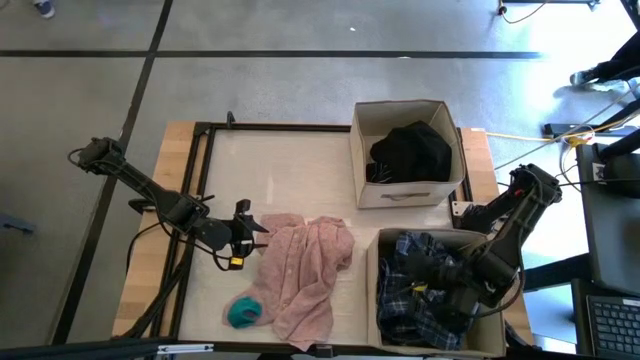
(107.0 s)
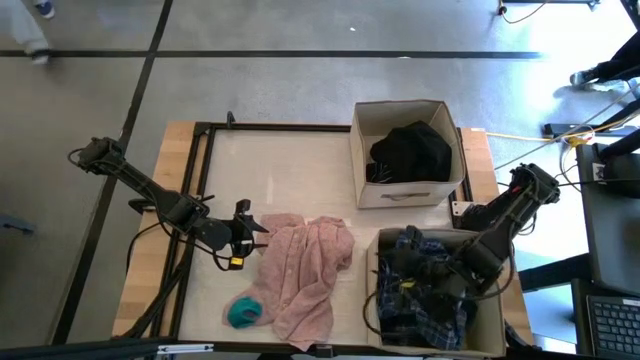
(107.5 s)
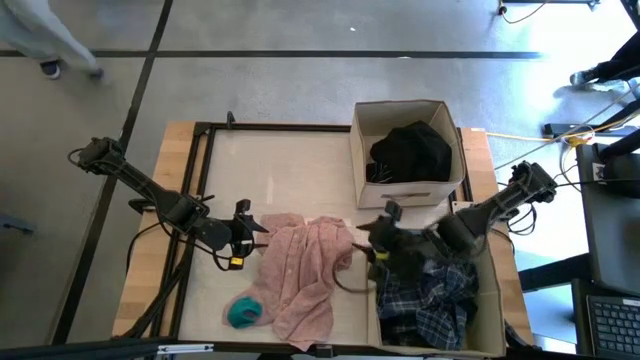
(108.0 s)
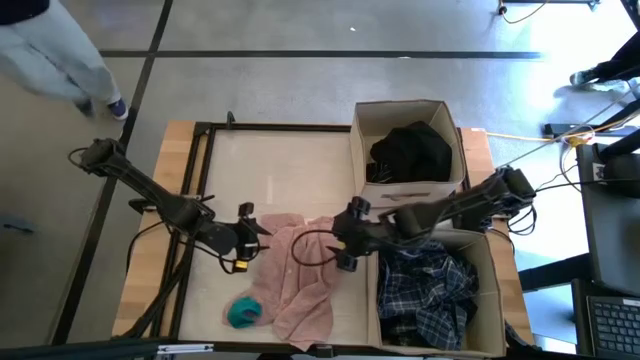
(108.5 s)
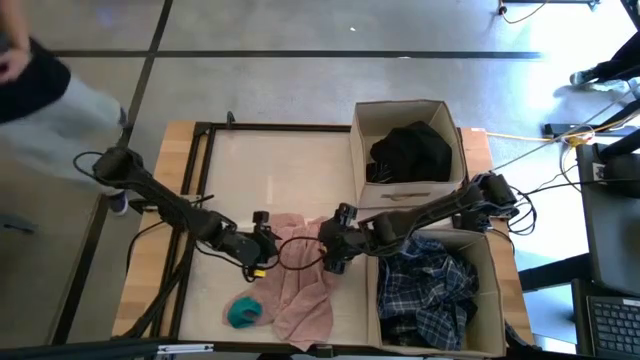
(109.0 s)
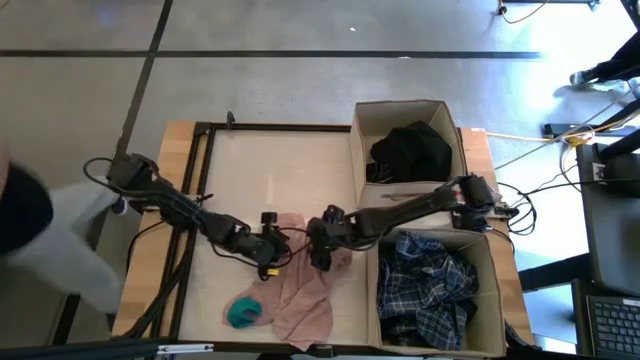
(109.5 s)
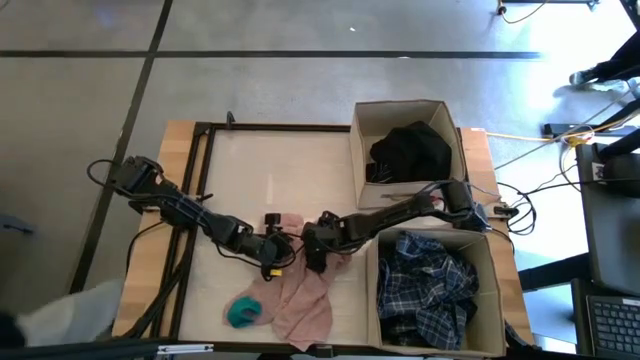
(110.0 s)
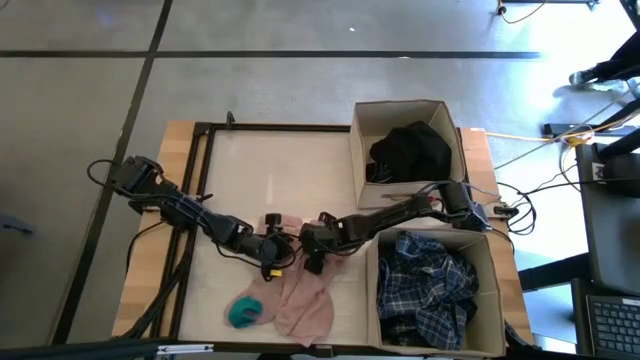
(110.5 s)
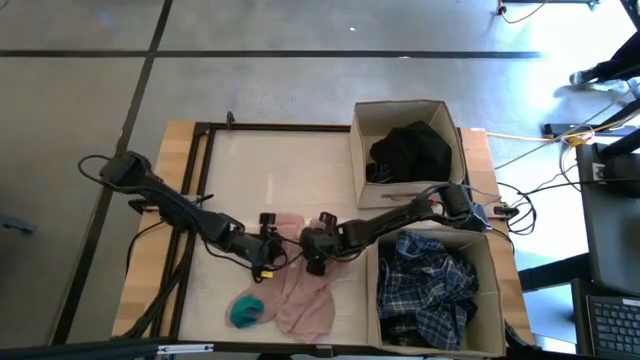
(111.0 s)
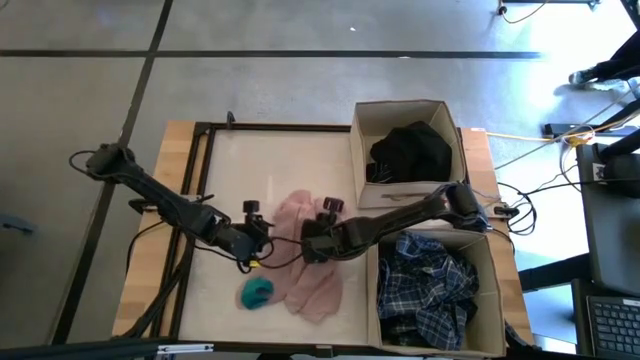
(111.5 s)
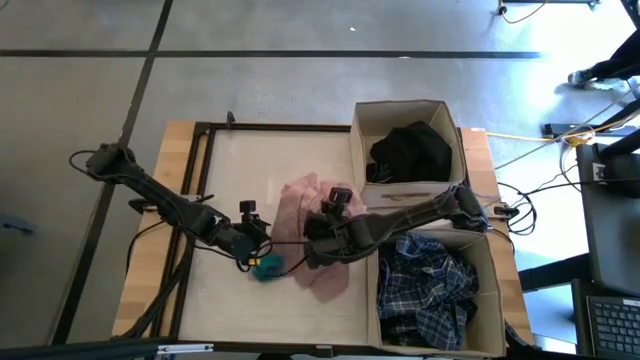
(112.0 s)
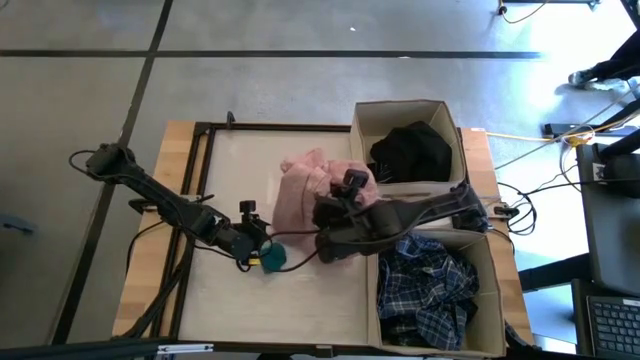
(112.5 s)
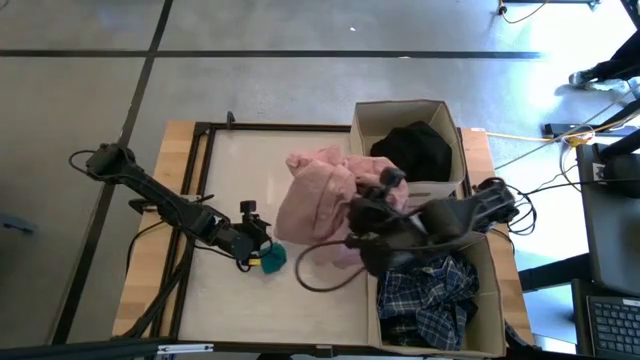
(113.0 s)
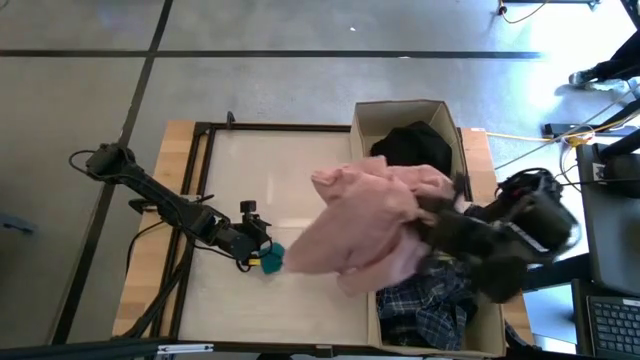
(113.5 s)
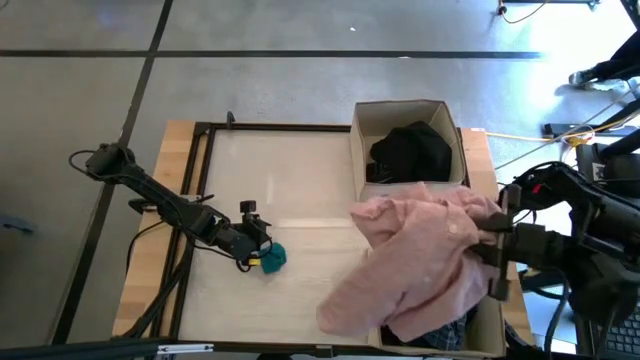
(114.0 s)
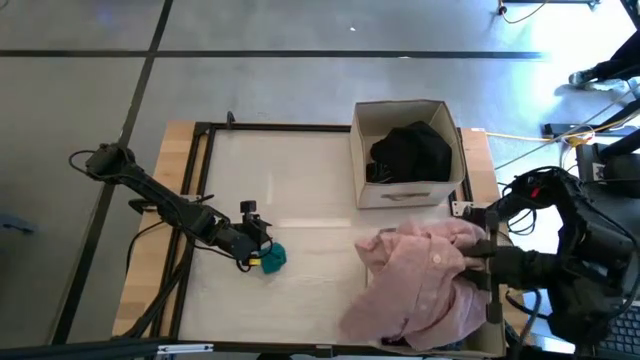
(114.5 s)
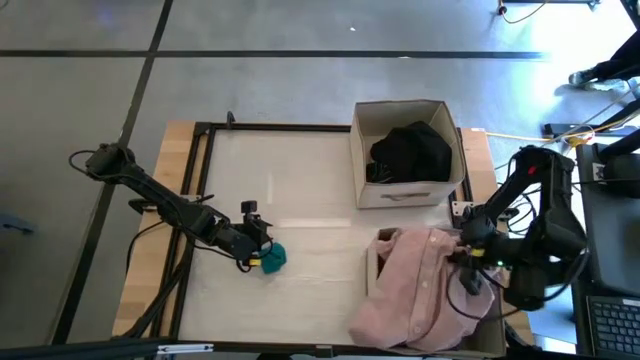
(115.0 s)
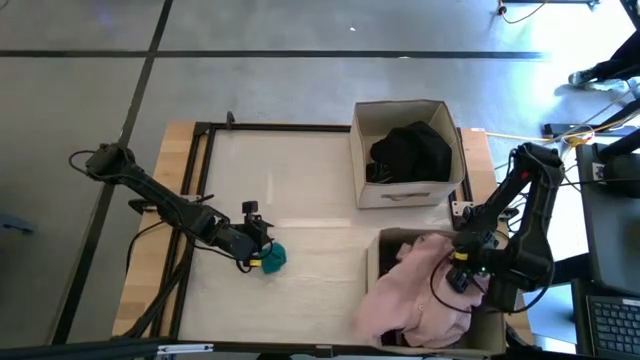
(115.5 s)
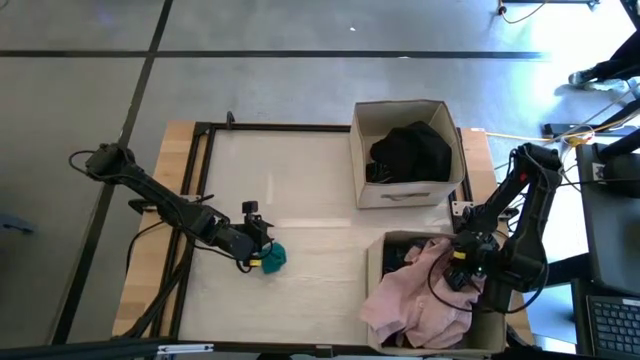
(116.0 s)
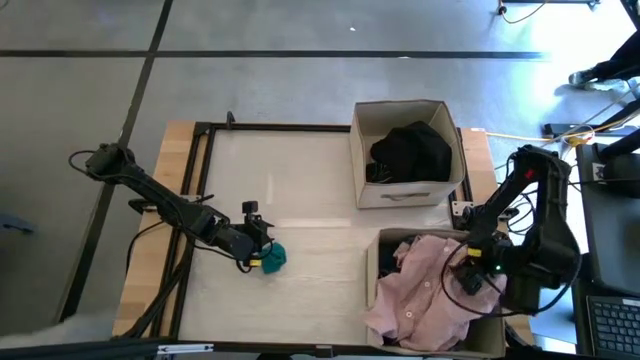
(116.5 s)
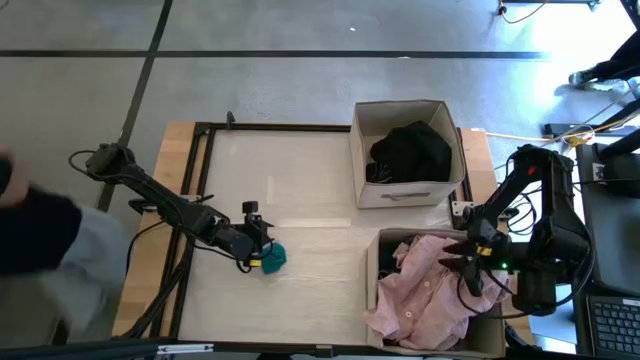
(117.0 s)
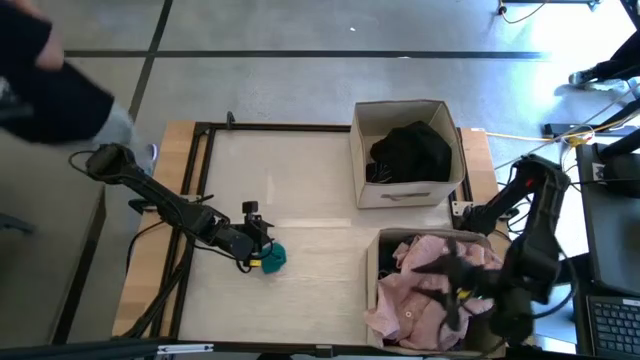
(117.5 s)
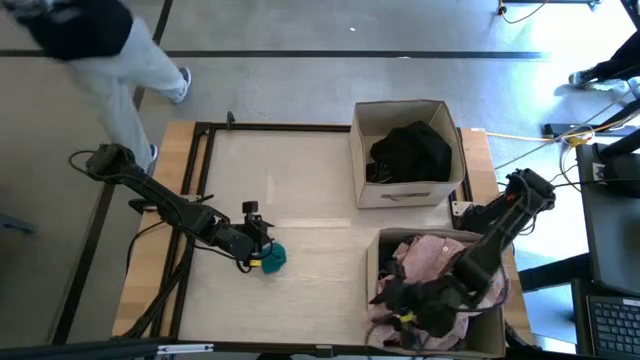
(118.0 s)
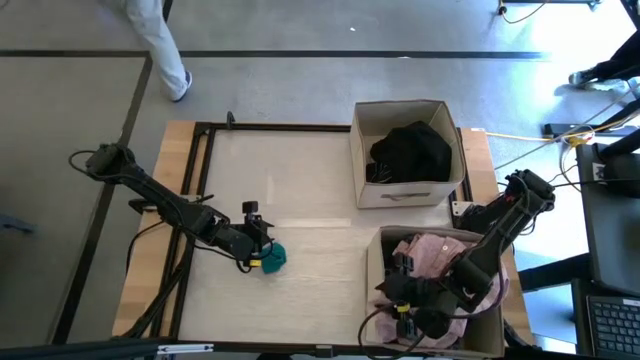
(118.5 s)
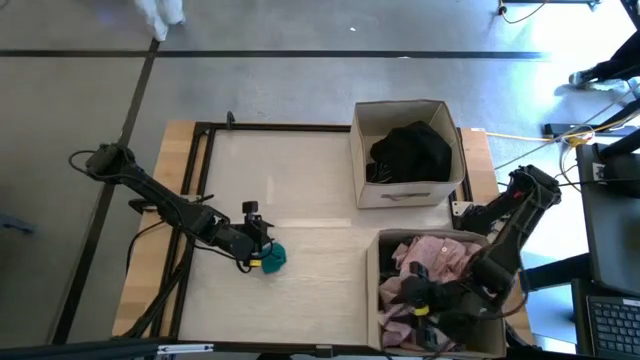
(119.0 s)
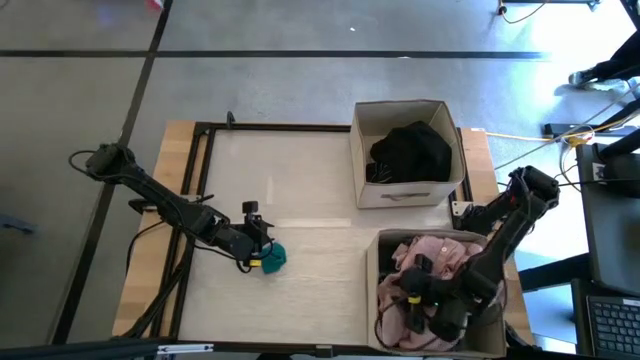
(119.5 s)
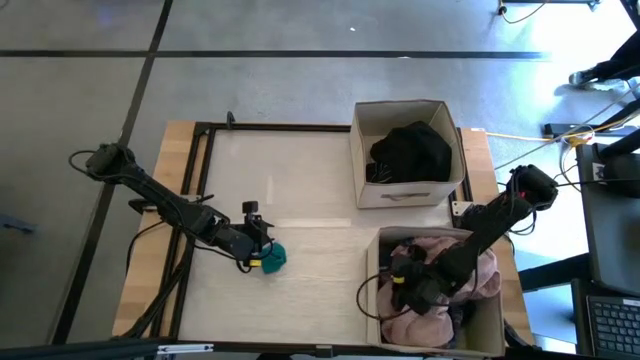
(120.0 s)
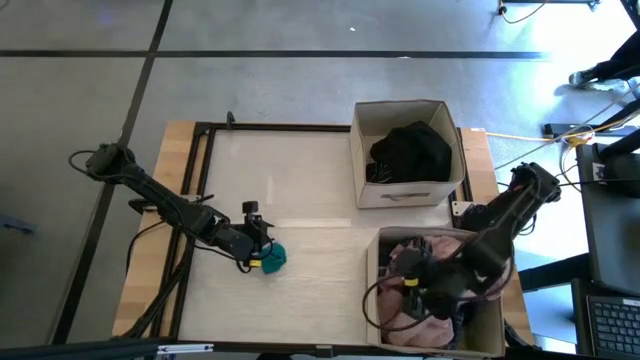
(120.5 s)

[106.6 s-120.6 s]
Task: Sort clothes
Put the pink shirt into the bottom laundry organizer

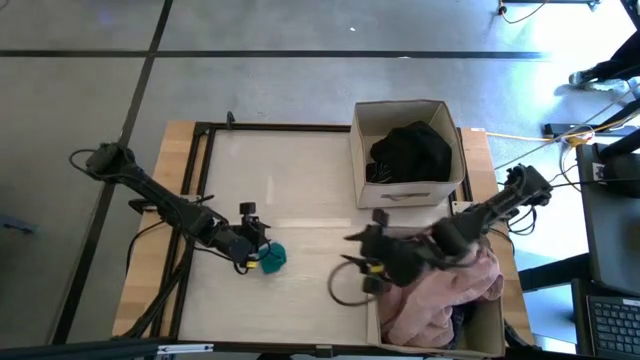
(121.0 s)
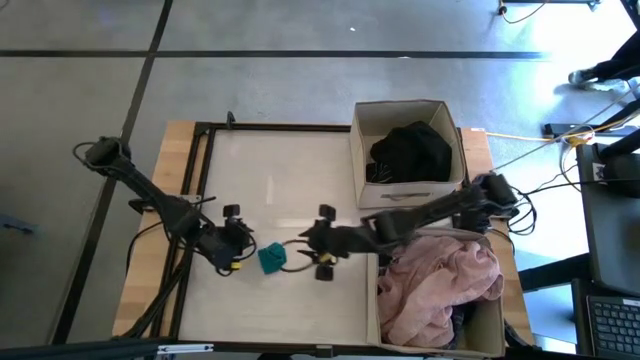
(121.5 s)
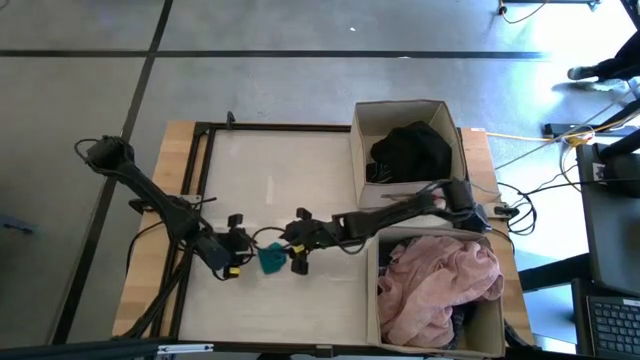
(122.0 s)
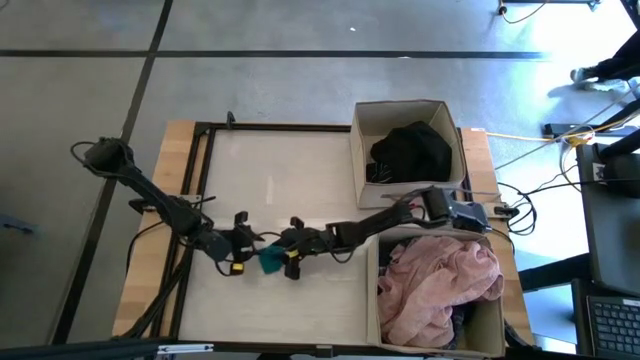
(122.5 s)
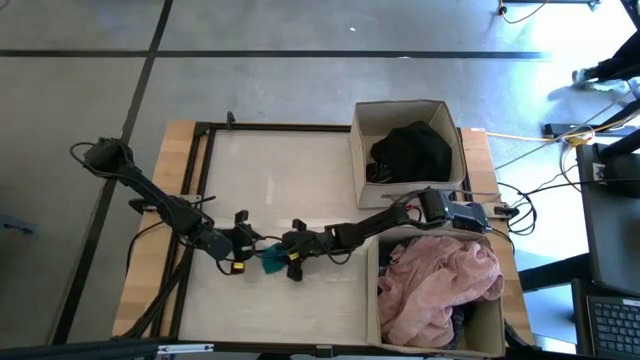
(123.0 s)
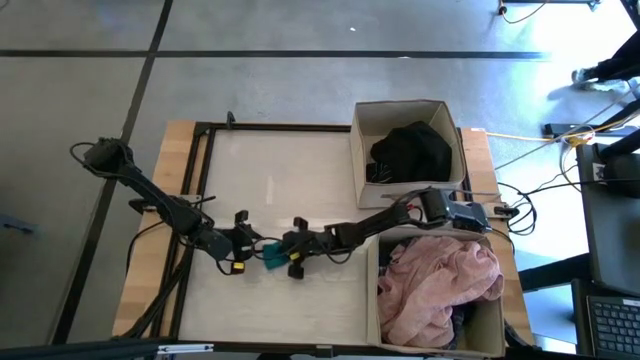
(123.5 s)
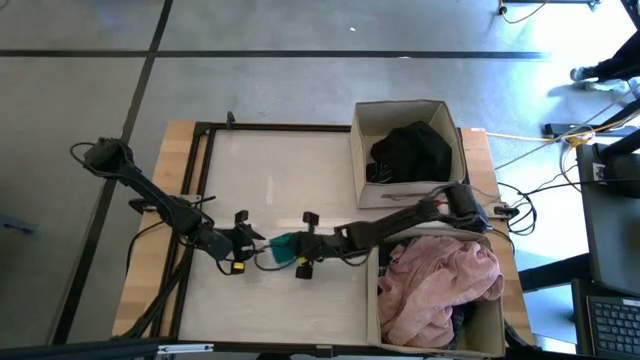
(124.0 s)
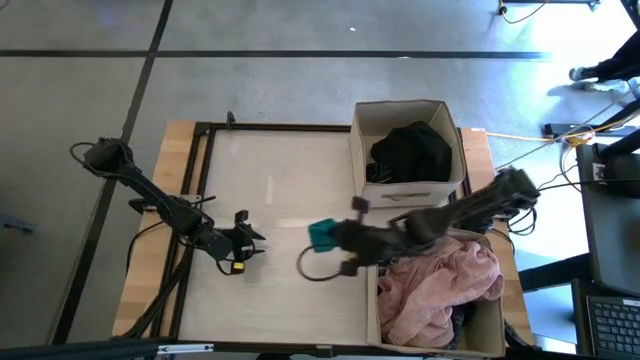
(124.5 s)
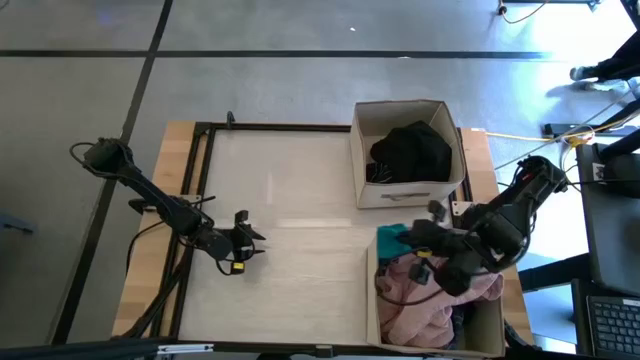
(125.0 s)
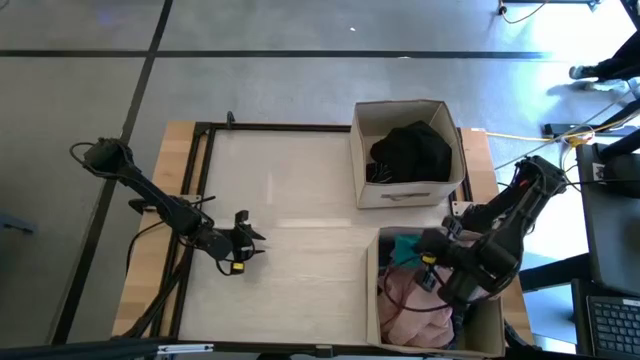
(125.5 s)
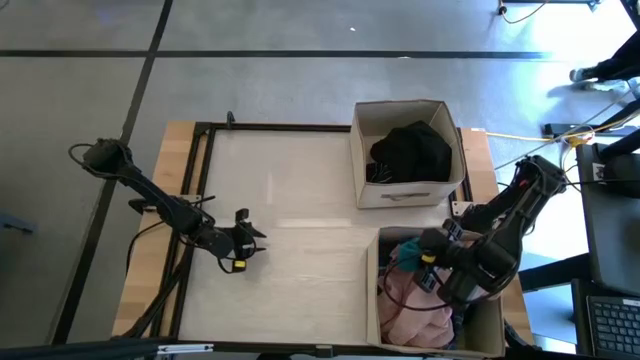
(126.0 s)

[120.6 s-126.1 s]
Put the blue sock into the bottom laundry organizer

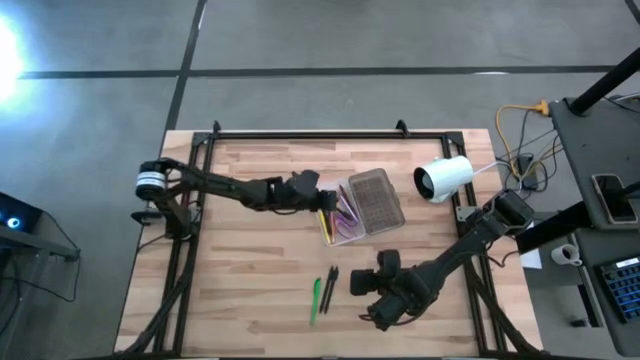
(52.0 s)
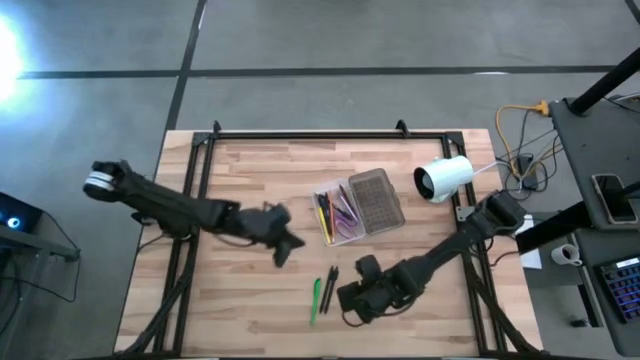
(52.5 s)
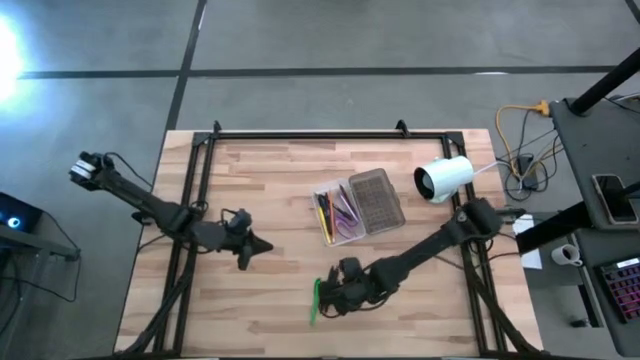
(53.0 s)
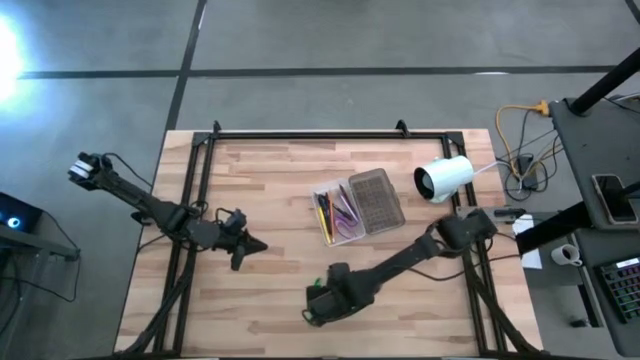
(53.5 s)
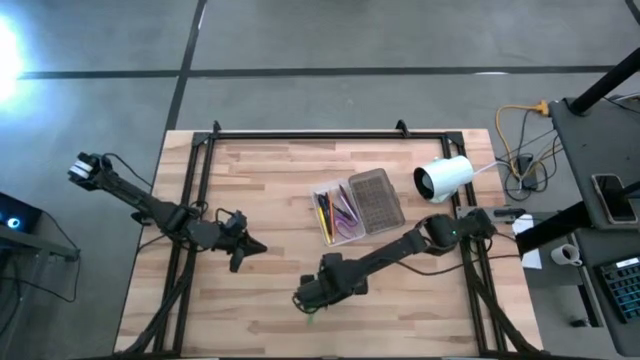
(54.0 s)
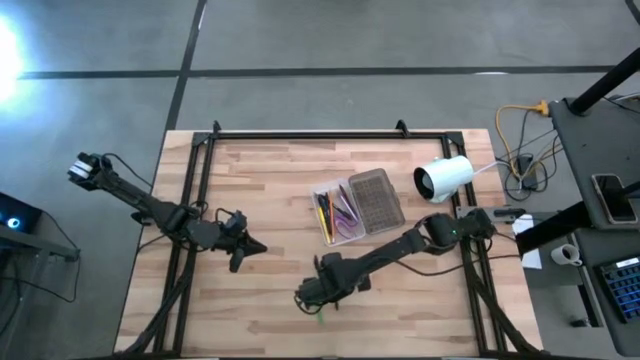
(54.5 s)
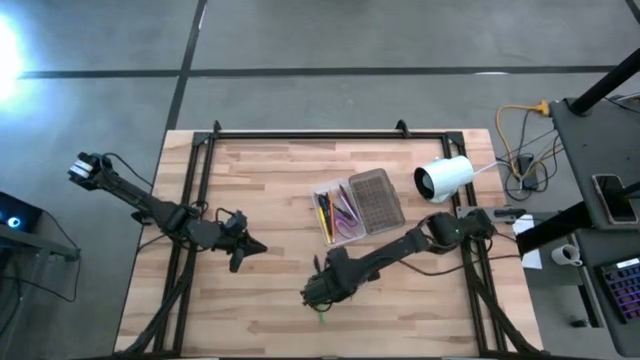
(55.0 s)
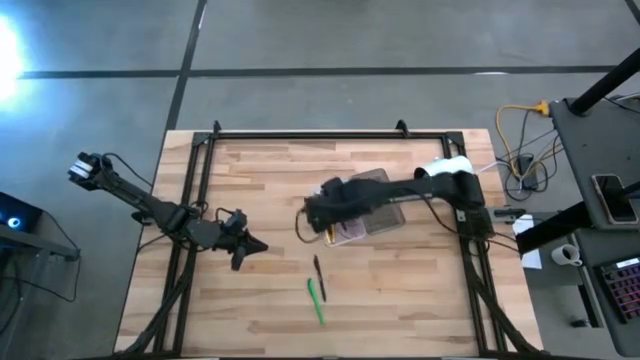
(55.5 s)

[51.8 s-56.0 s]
Task: Pick & place school supplies into a supply box
Put the black pen into the supply box
